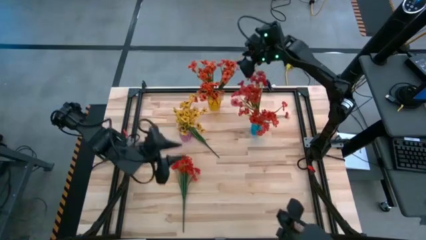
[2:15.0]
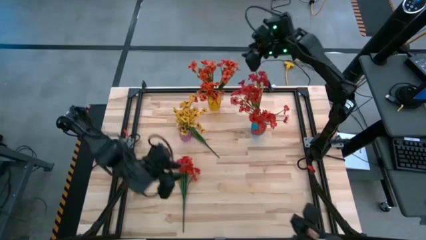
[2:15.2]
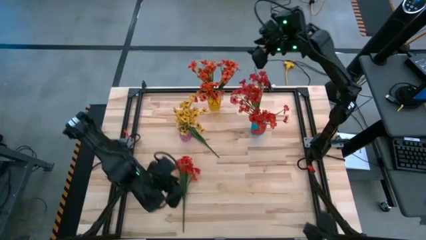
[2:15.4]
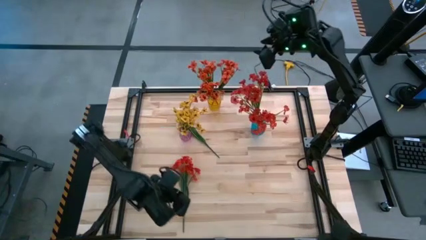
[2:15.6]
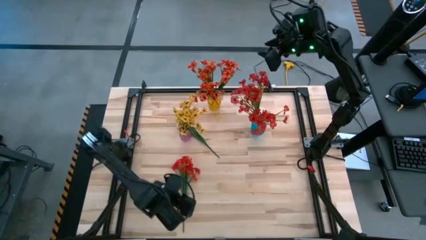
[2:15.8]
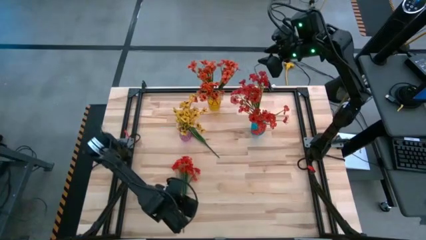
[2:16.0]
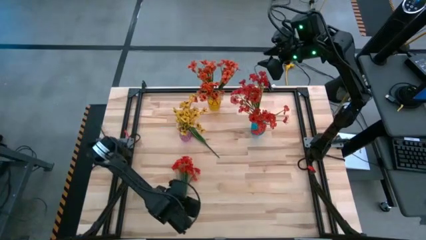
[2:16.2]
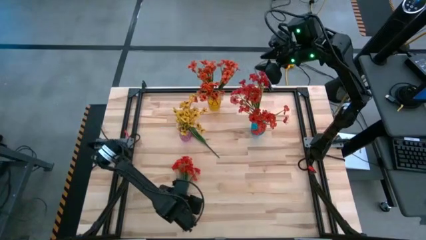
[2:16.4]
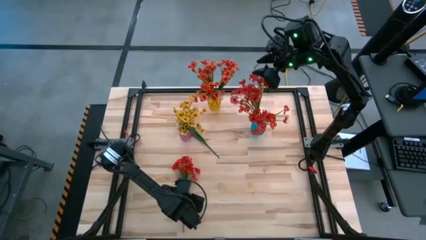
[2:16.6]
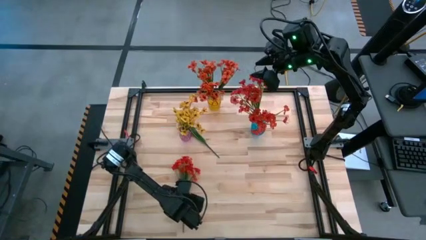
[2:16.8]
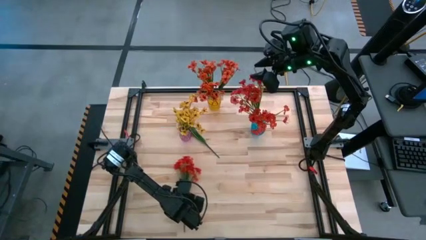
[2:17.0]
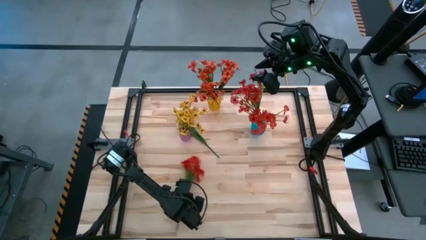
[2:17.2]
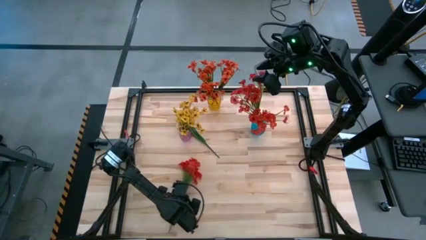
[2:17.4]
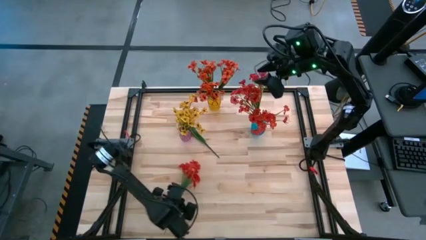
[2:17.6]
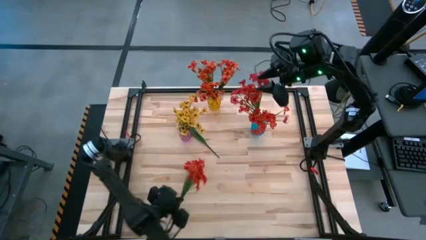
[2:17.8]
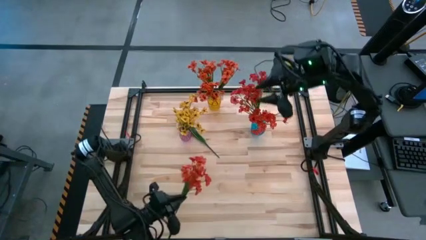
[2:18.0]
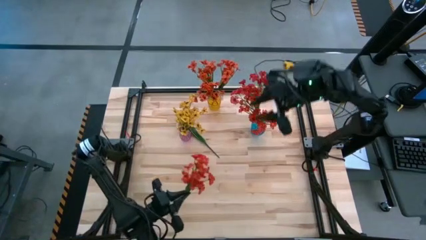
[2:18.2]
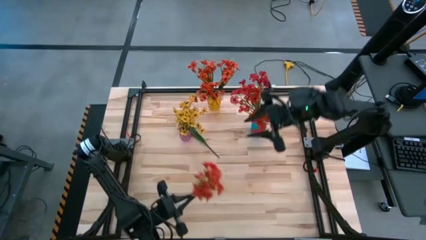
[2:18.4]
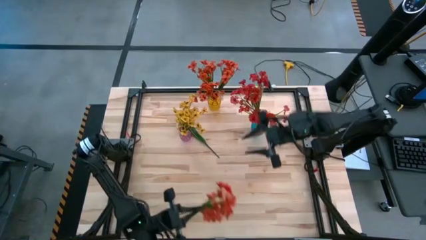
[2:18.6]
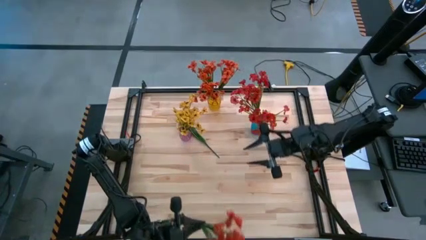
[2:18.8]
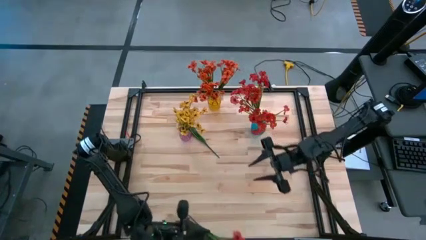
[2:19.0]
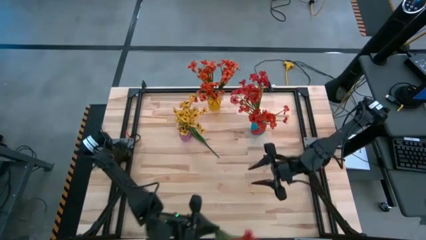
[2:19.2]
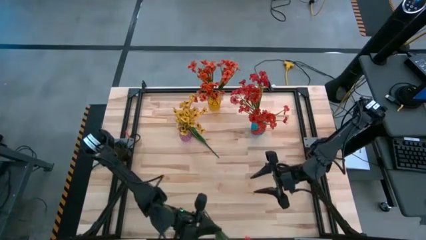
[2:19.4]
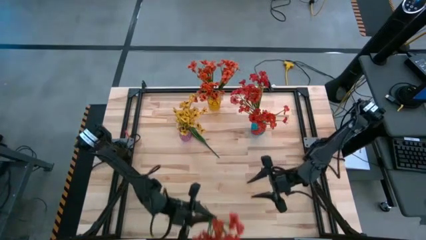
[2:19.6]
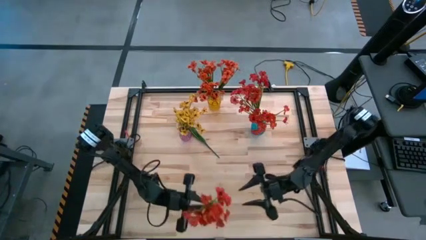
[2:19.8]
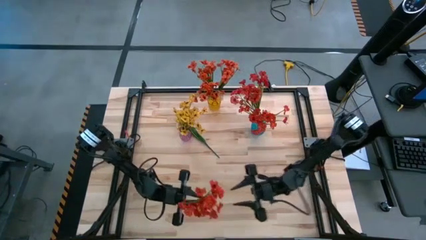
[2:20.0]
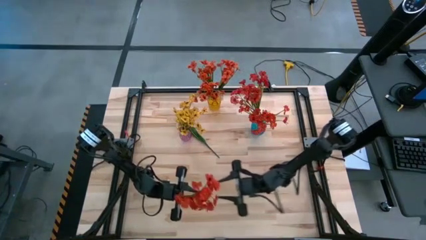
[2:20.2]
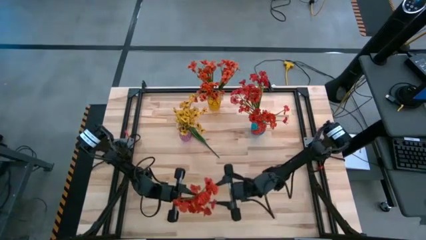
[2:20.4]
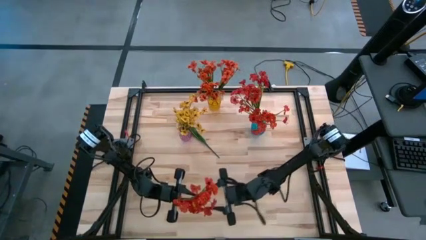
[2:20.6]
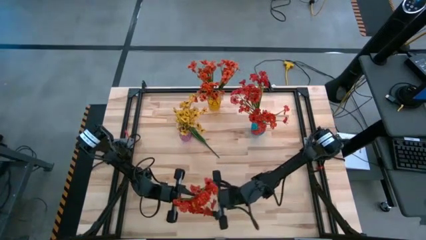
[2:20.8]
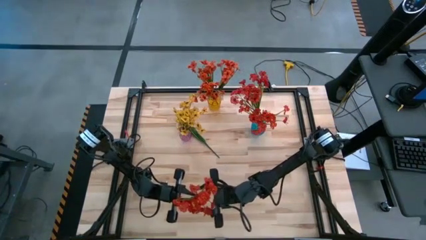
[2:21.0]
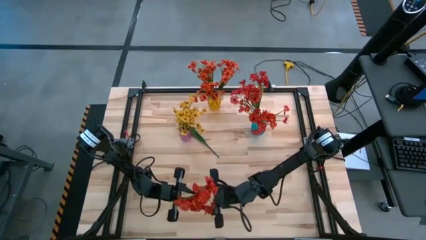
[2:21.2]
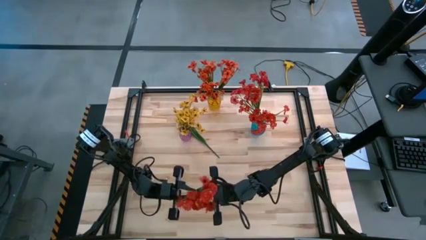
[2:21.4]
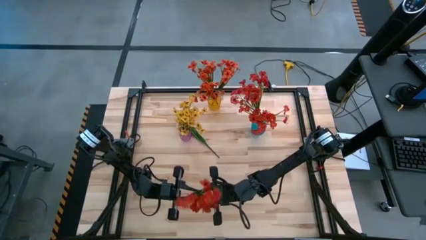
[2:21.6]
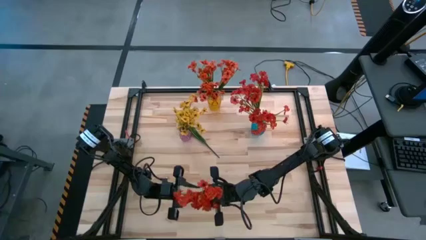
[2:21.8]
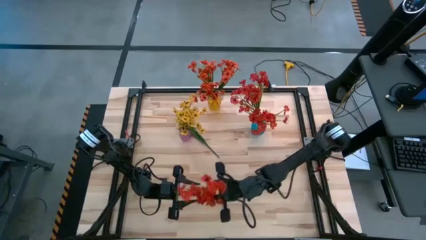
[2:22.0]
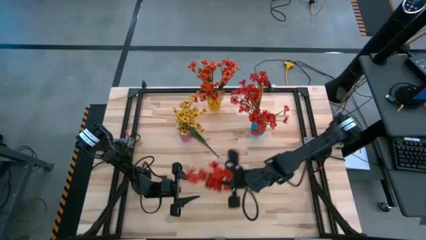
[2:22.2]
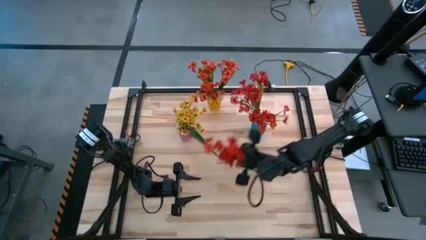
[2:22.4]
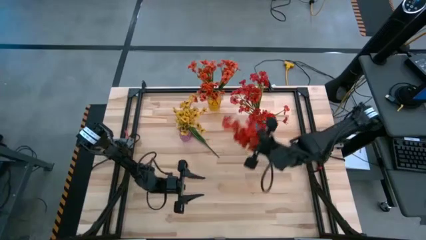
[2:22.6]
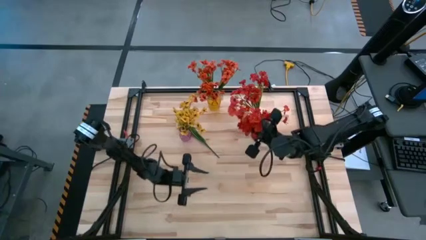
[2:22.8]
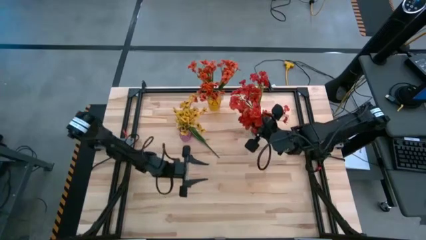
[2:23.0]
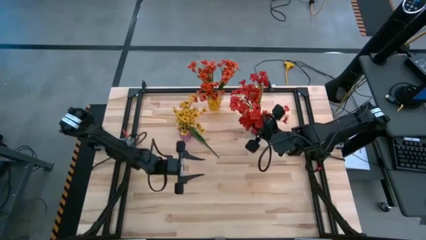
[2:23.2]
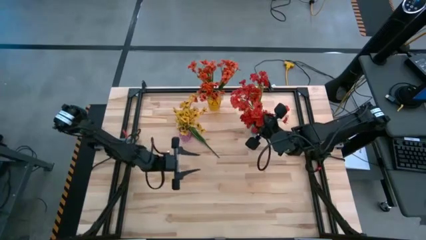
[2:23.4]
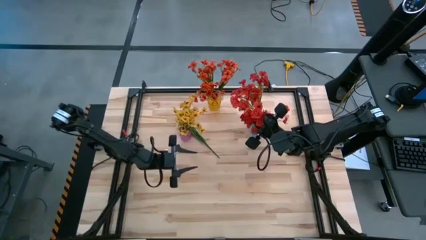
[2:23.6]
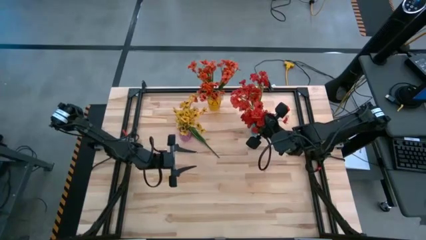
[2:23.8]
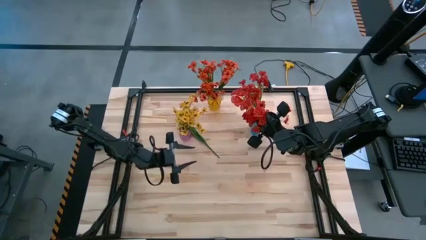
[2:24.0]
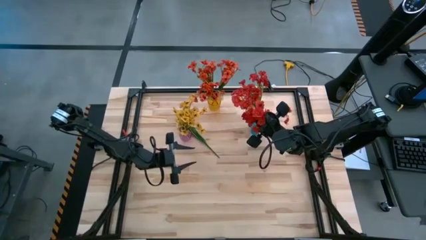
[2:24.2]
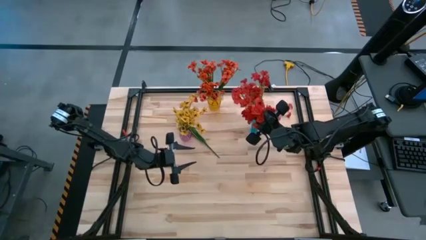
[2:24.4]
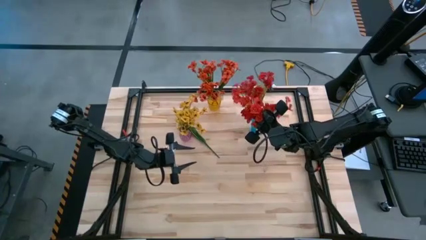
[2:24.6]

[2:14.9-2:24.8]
Task: Sort flowers into vase by color
Put the red flower into the blue vase

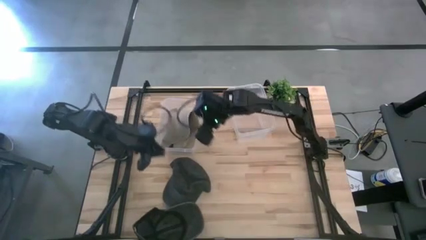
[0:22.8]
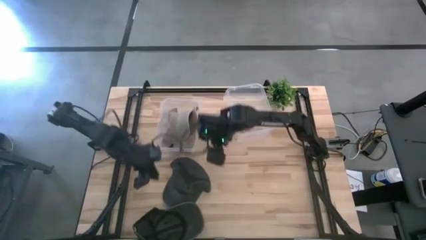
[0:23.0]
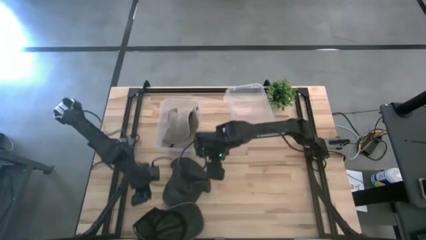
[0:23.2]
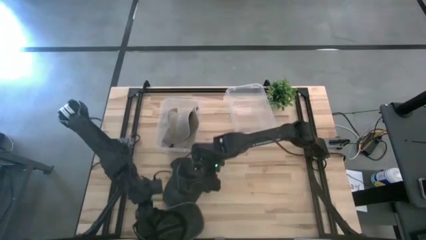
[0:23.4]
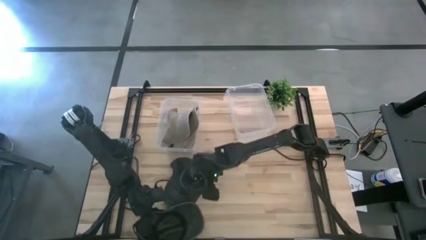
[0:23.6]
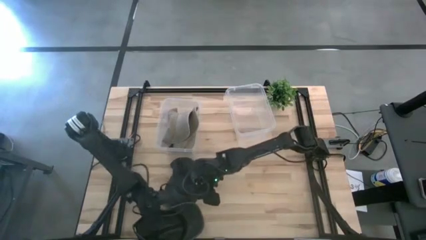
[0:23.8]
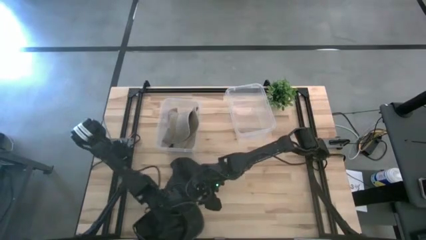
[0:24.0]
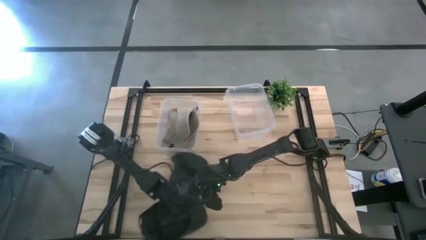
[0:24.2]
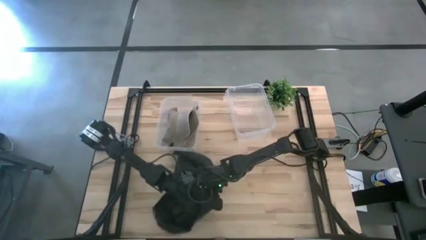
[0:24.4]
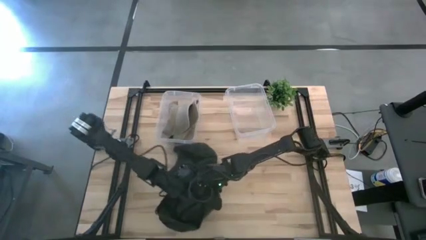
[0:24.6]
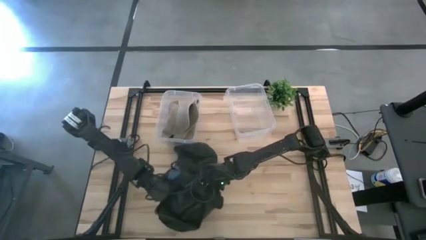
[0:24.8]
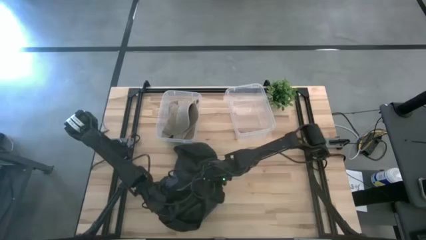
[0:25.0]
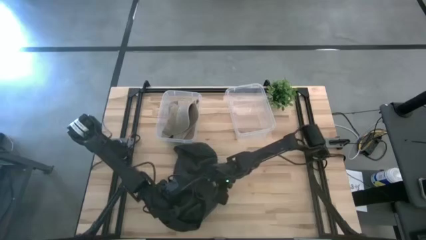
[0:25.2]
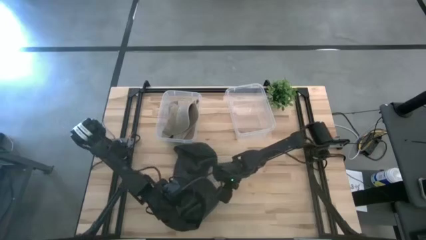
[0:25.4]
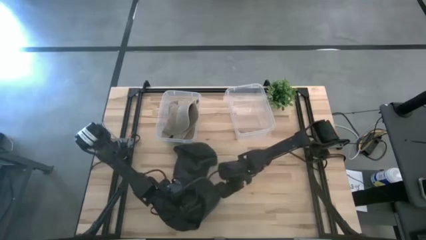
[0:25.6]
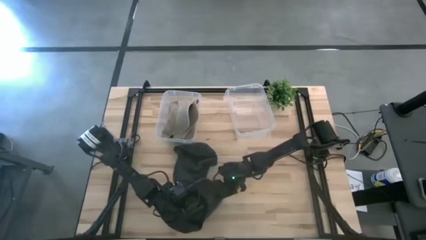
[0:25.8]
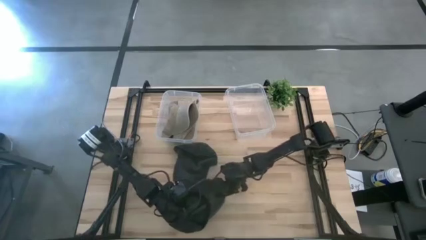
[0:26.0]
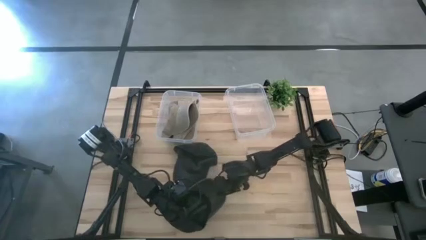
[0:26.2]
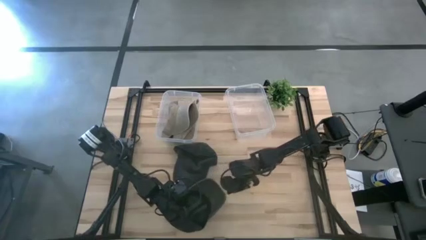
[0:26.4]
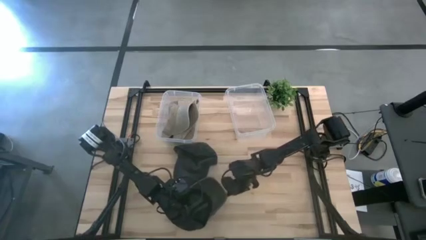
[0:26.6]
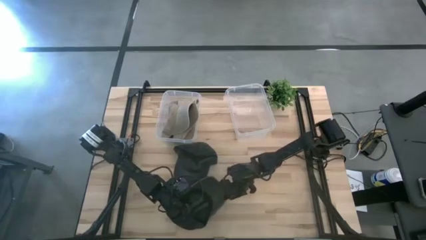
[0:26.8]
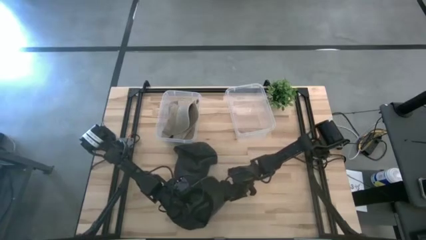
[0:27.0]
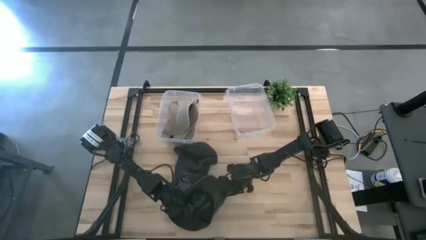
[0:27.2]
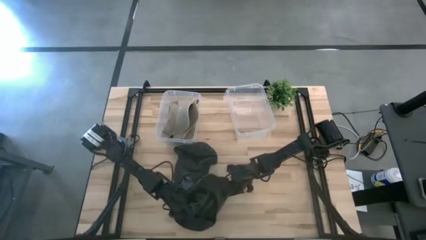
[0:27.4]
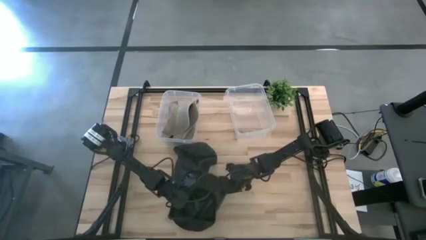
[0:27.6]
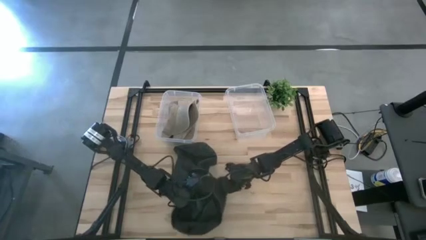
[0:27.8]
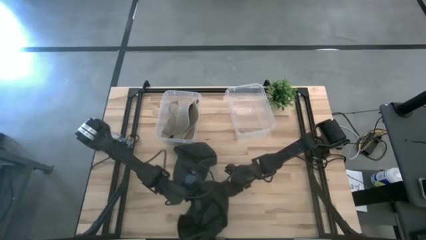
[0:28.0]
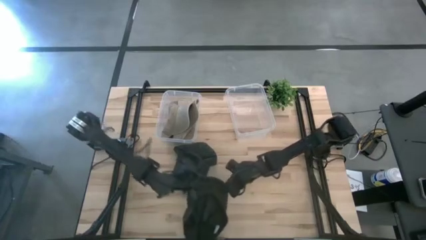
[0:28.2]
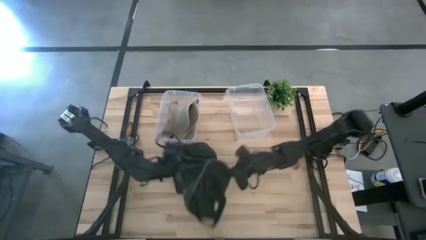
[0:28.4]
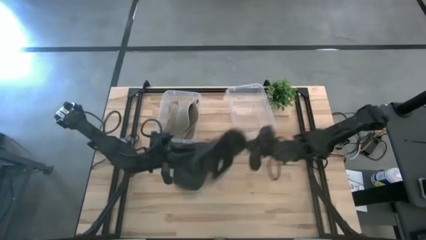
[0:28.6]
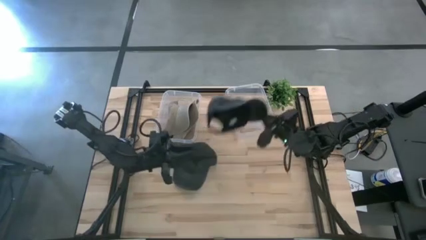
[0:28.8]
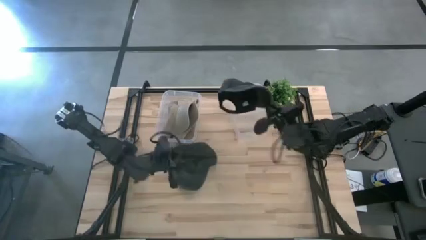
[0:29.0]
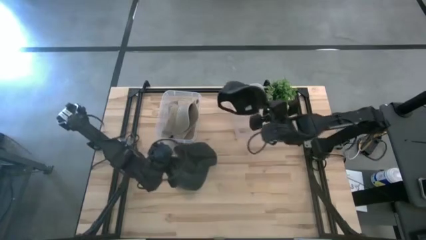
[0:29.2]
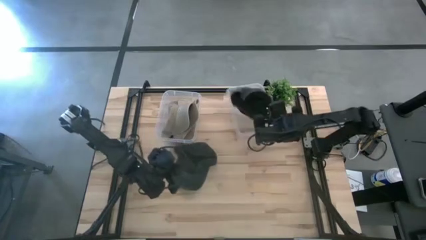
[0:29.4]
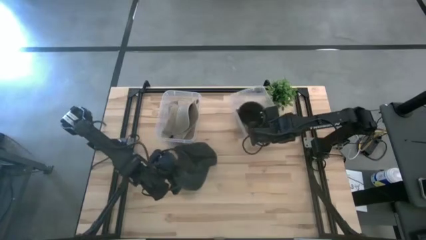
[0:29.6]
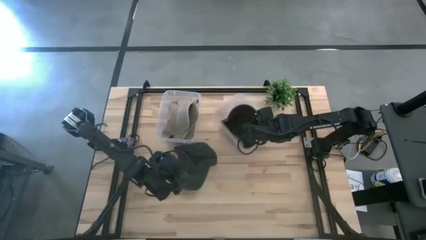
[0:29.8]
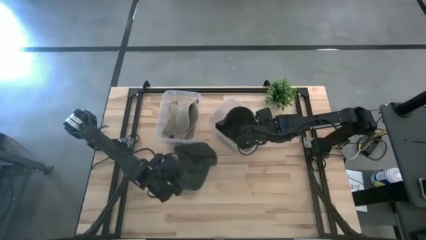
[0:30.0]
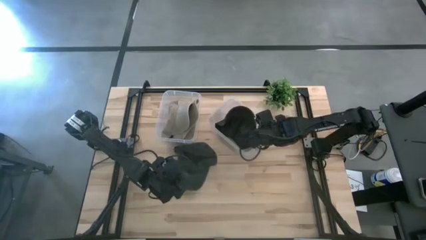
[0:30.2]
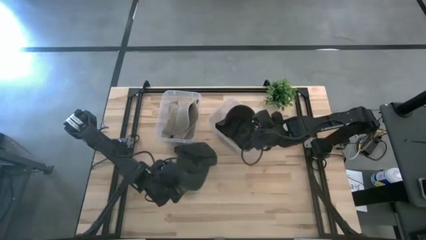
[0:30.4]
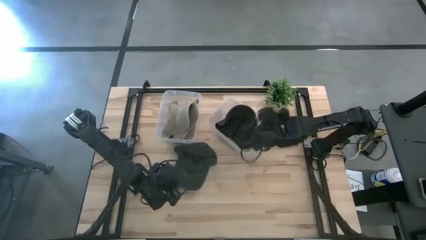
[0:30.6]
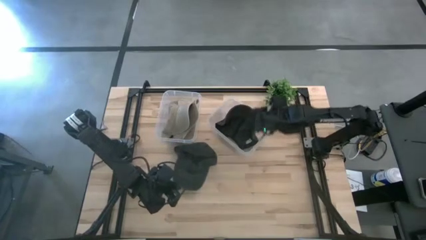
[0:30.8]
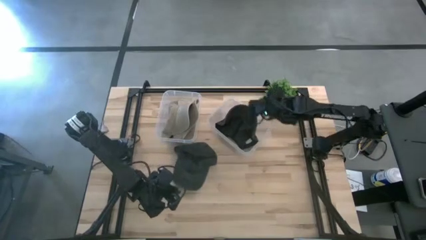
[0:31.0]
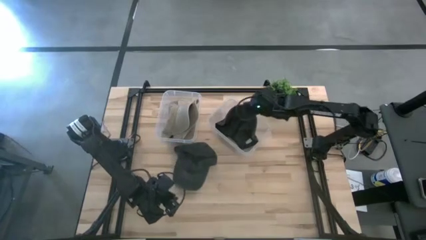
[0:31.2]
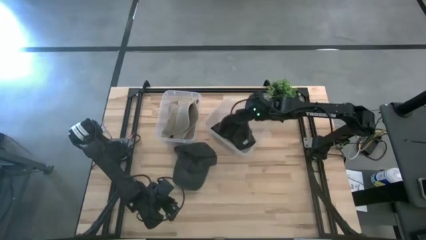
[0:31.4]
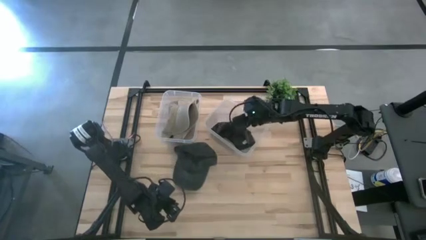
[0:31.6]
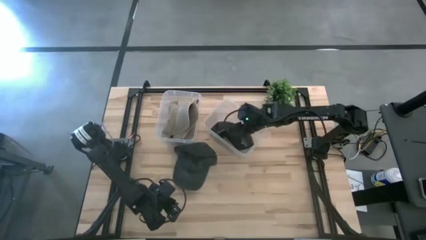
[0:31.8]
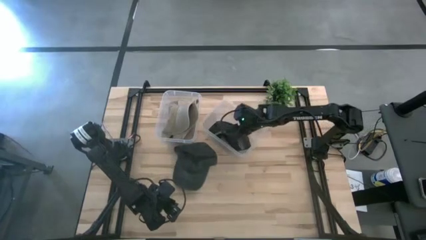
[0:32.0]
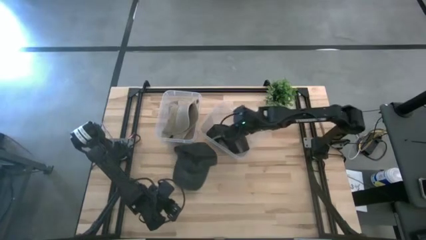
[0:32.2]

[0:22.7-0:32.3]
Task: Pick & Place hat
Put the bottom black cap into the right transparent bin
